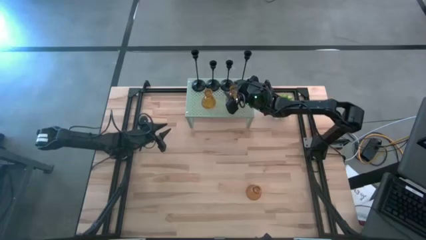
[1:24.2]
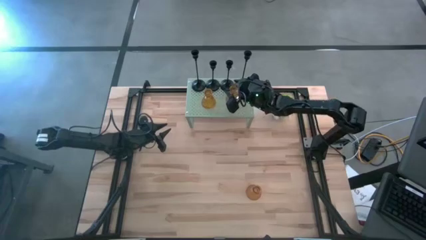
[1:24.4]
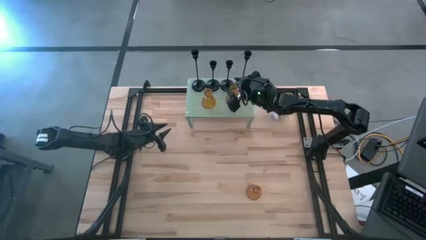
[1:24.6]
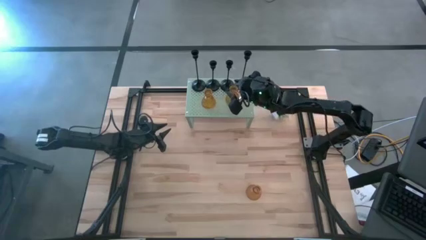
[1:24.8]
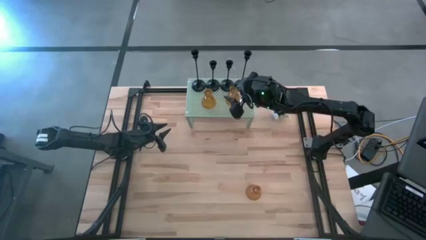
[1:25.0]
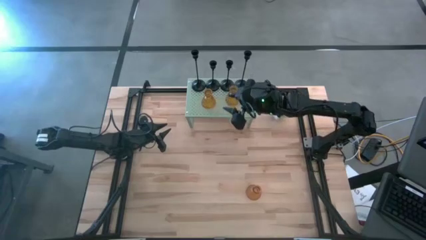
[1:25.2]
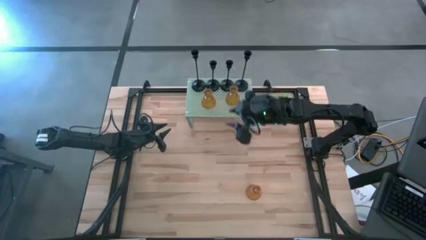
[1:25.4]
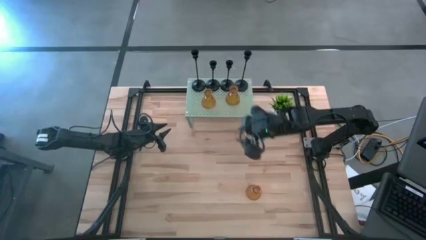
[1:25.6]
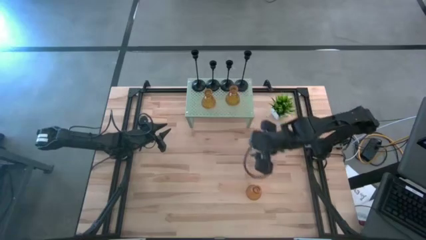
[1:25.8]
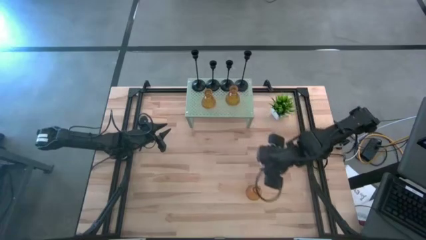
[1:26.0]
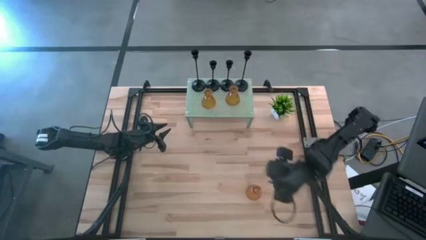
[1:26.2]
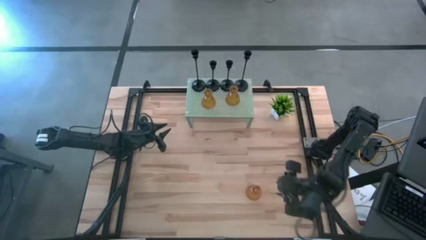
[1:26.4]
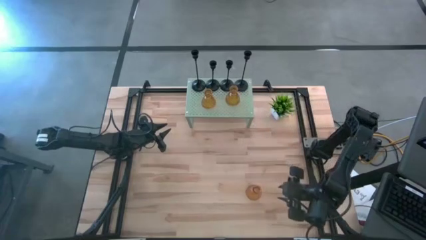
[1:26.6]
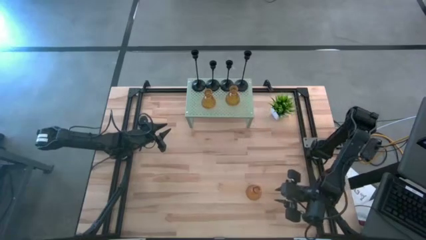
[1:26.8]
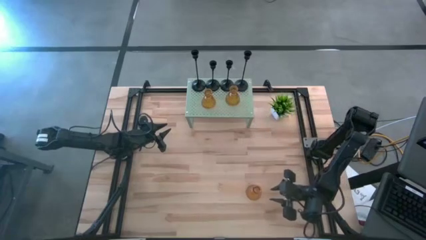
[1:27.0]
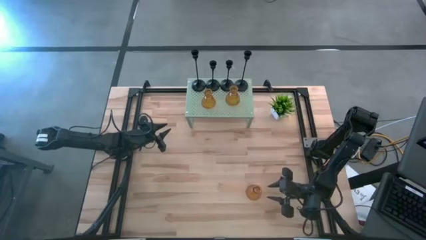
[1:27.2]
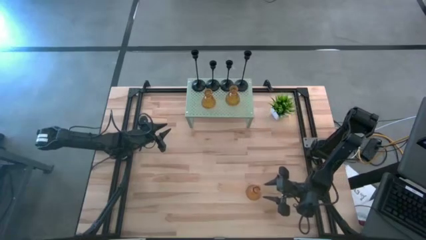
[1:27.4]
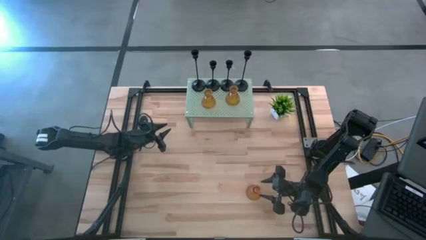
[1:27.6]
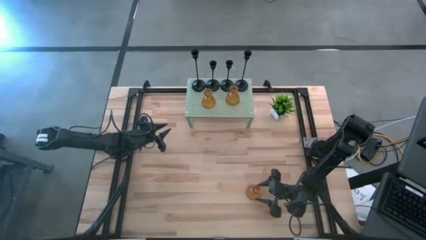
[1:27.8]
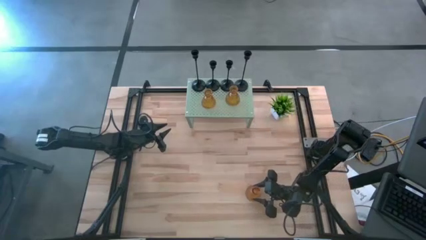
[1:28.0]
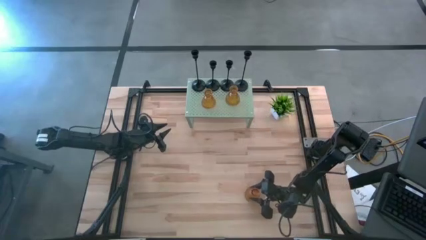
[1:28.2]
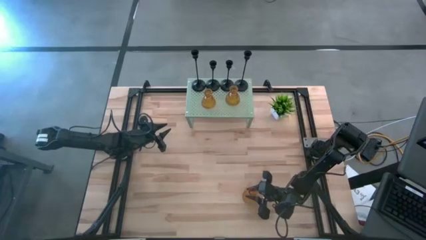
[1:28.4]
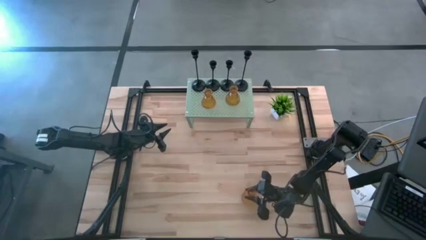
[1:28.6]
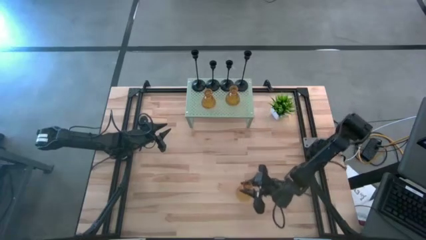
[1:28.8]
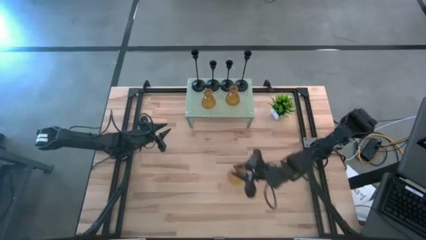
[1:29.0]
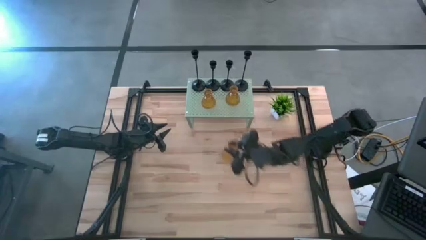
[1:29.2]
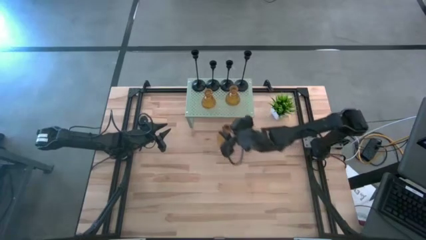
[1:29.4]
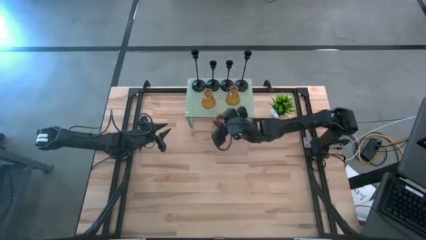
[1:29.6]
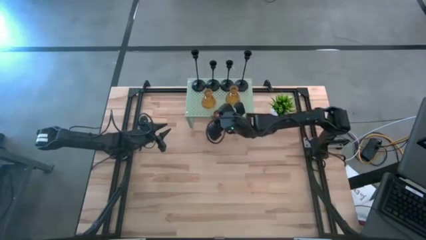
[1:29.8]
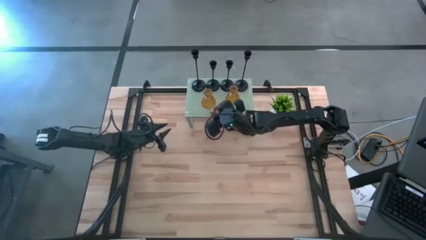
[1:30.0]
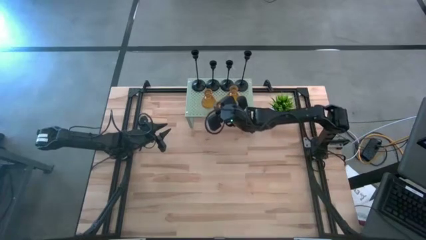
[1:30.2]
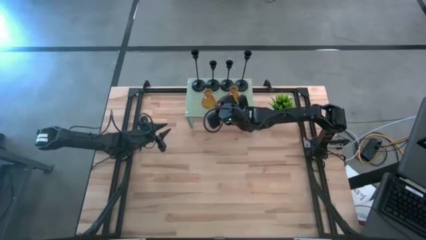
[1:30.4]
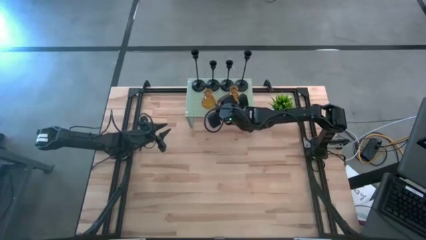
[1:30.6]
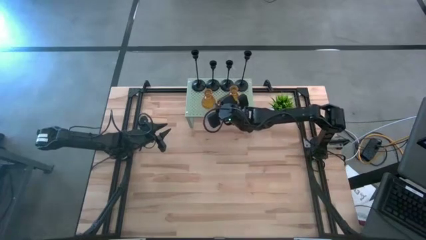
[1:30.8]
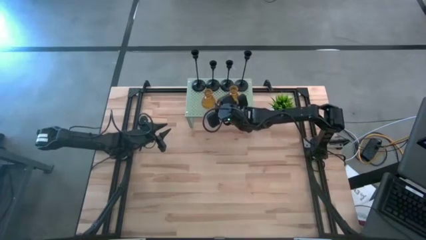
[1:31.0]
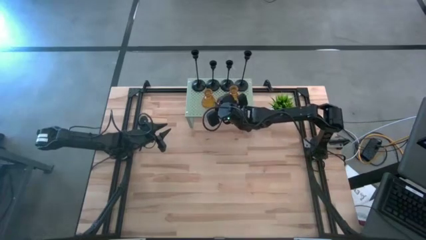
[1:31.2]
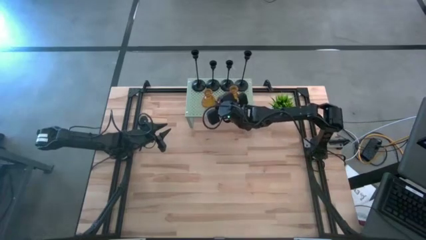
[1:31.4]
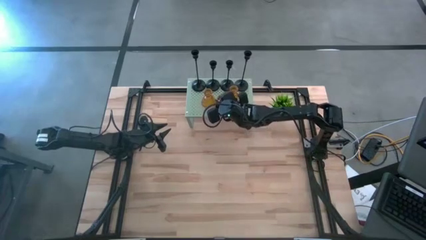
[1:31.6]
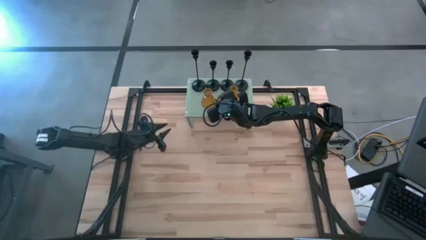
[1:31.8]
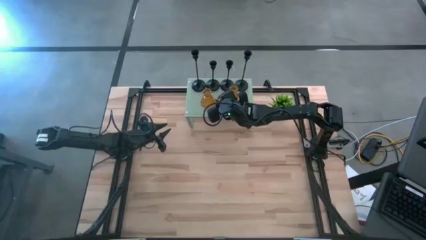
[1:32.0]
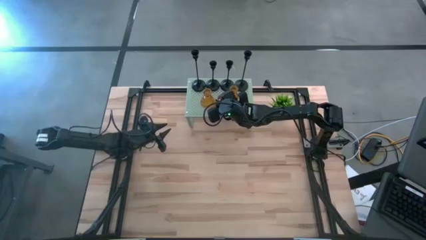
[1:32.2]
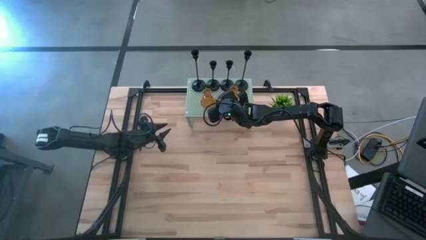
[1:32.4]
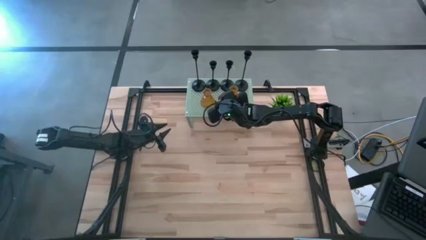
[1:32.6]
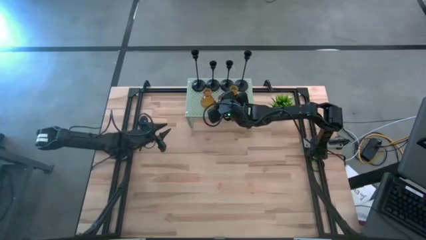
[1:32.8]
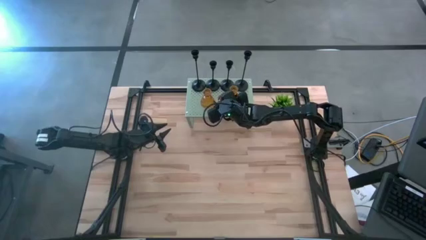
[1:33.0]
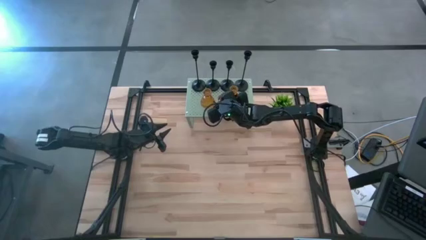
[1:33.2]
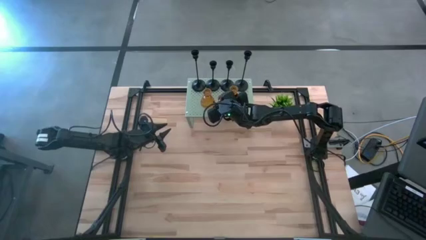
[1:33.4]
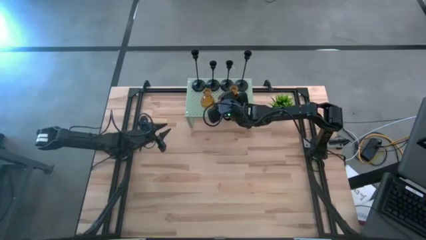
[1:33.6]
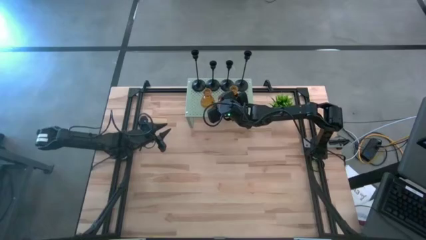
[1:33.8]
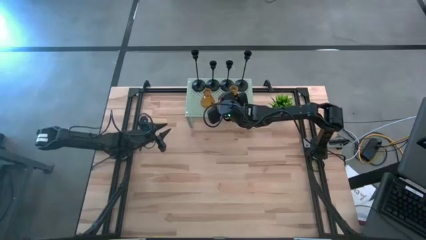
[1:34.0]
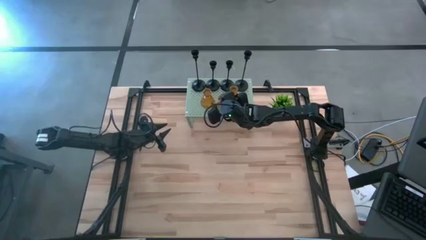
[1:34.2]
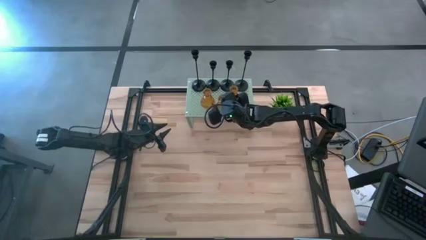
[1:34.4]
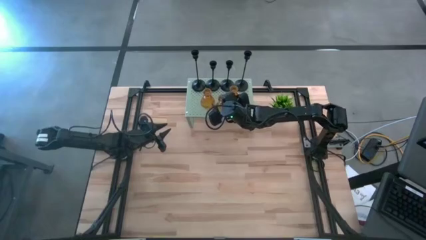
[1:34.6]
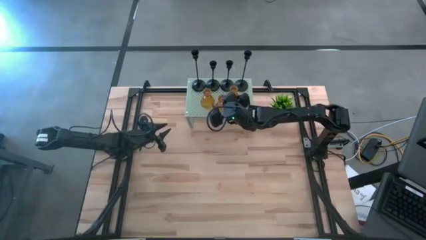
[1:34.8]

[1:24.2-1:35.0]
Task: Pick & Place candle stick holders
Put the orange candle holder on the shelf aligned with the other orange candle holders

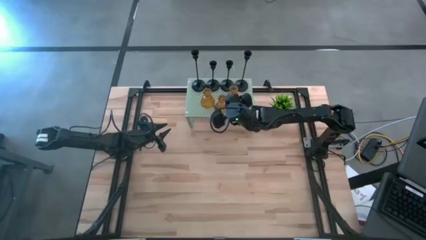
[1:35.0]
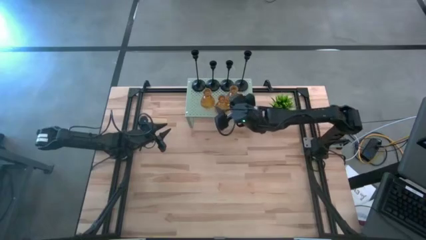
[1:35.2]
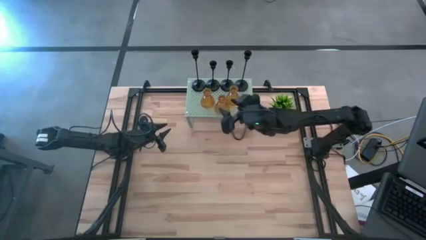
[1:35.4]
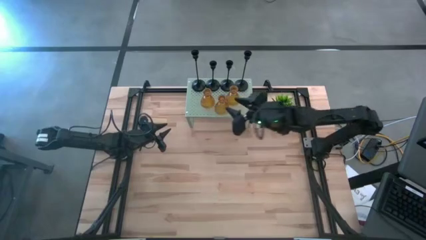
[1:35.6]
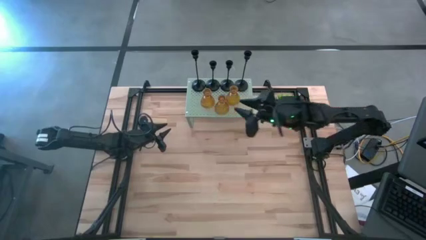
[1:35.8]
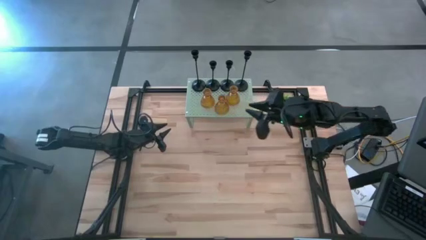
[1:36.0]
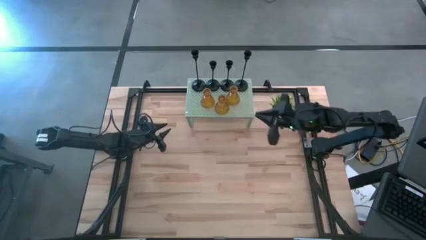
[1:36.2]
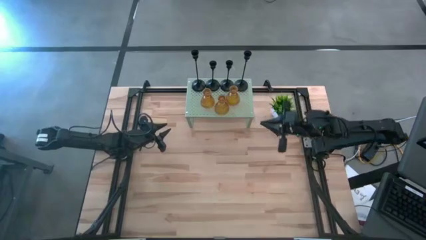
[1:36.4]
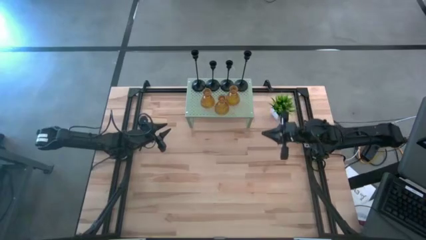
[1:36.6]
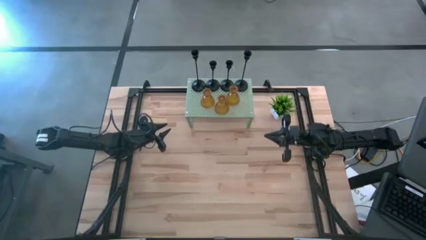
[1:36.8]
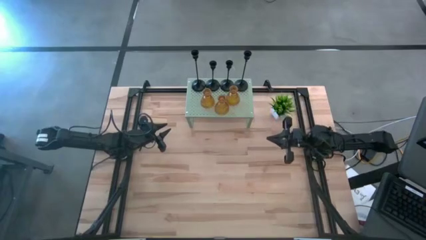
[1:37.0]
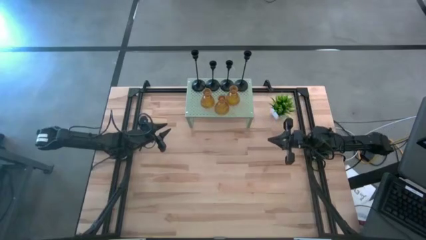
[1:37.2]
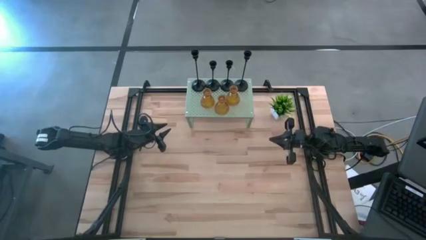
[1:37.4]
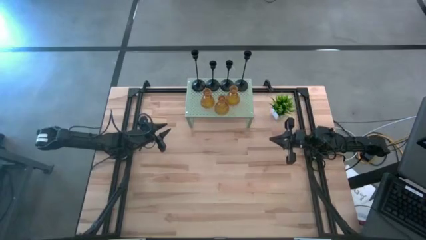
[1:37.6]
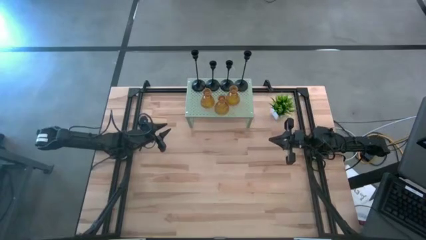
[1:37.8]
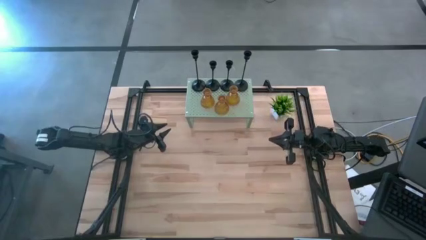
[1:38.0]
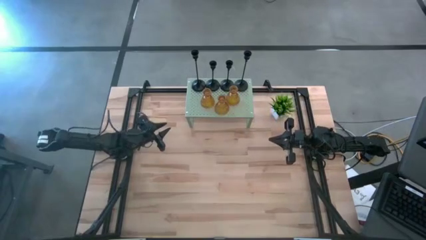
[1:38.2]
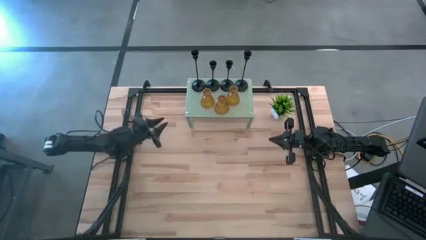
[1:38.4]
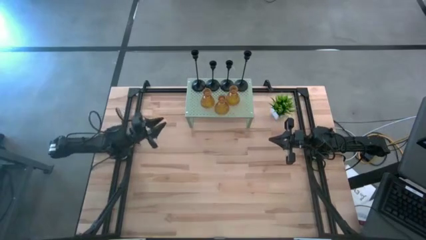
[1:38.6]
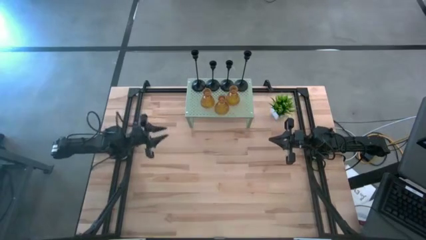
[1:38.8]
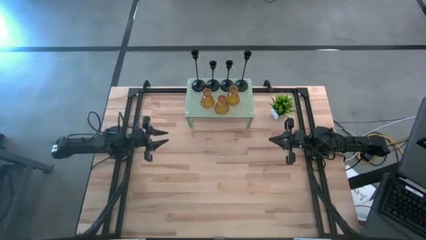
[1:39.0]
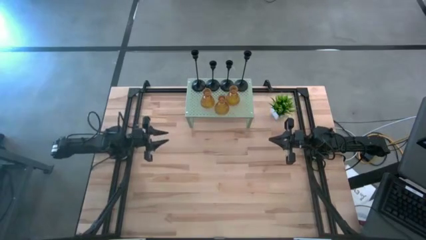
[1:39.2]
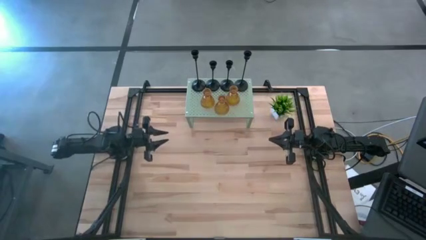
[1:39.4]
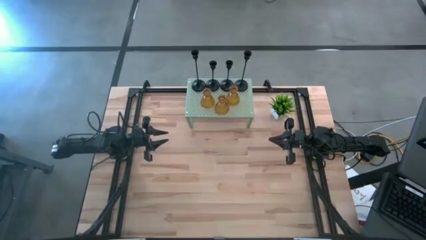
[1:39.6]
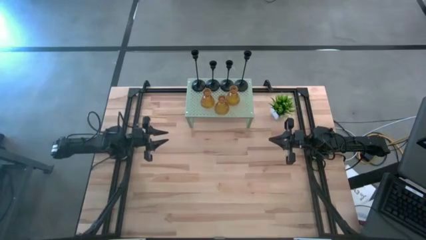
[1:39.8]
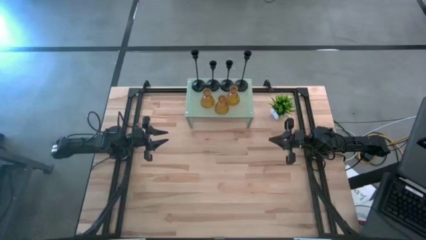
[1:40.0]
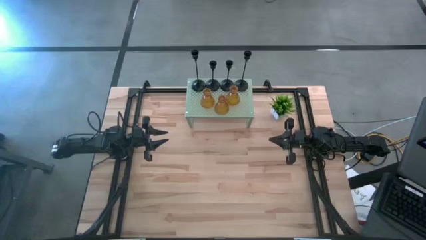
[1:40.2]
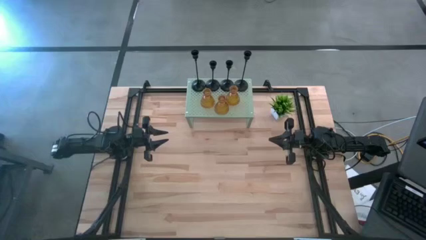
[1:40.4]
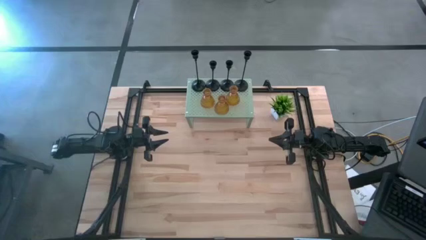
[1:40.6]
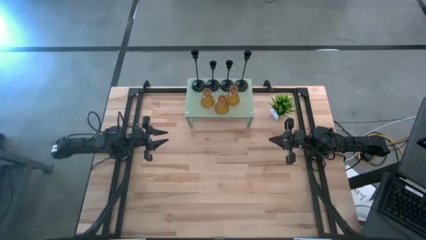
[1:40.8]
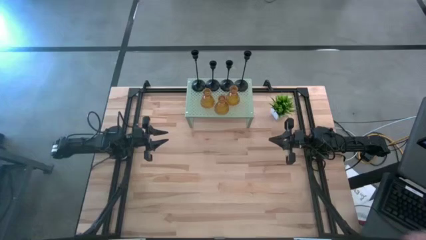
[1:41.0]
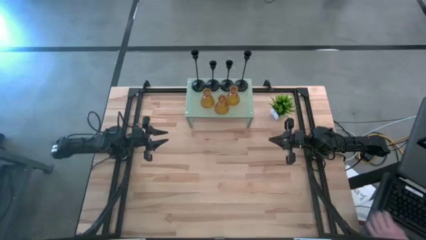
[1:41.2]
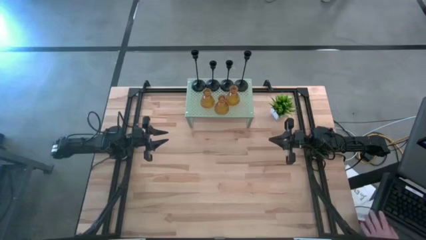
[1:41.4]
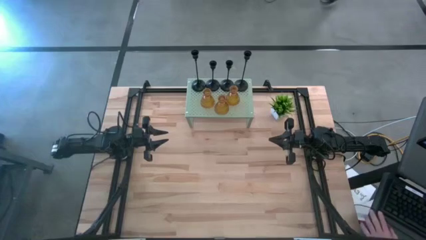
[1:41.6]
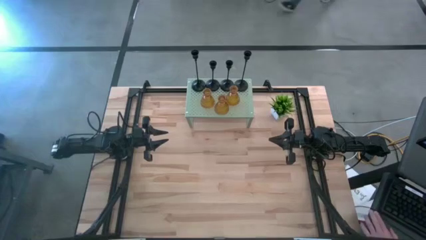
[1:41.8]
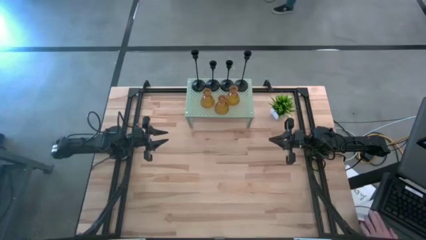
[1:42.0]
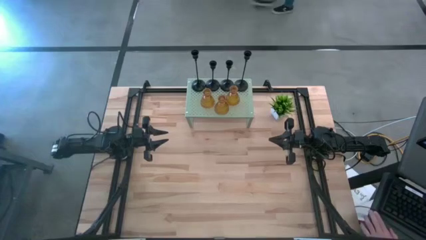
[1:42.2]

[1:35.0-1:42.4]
Return to Home Position
